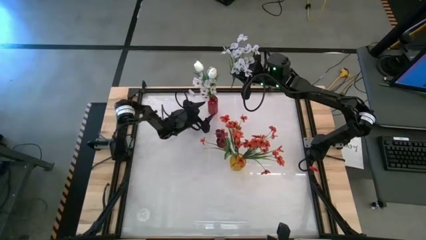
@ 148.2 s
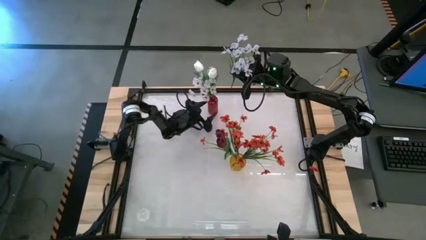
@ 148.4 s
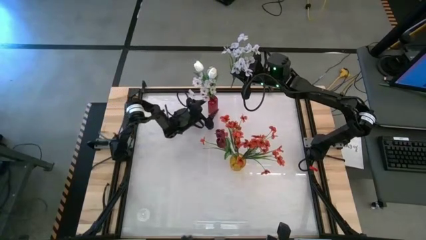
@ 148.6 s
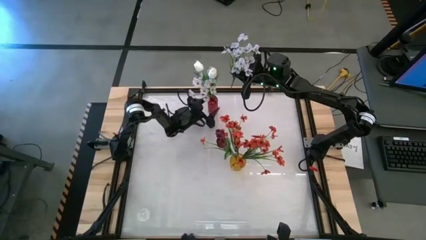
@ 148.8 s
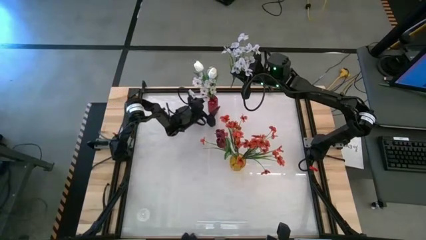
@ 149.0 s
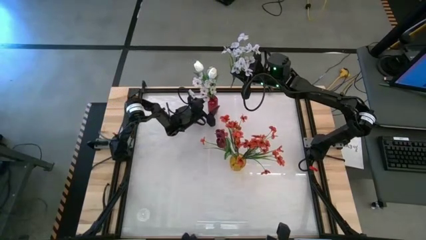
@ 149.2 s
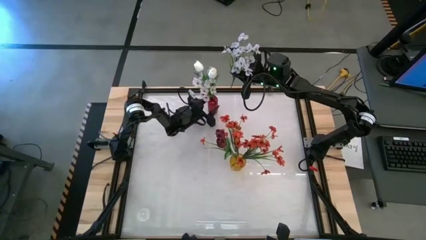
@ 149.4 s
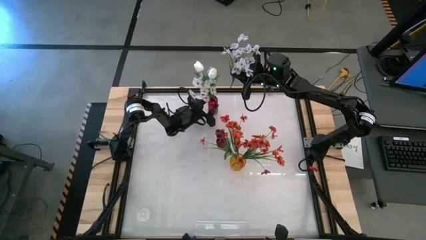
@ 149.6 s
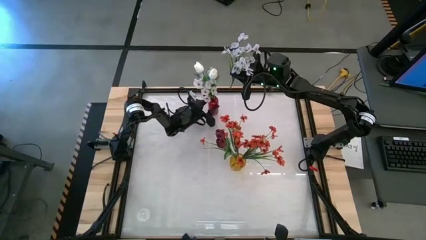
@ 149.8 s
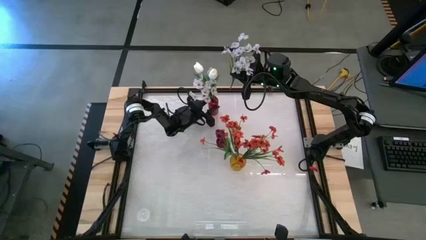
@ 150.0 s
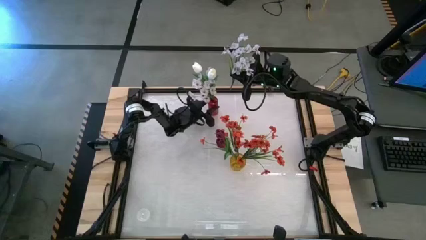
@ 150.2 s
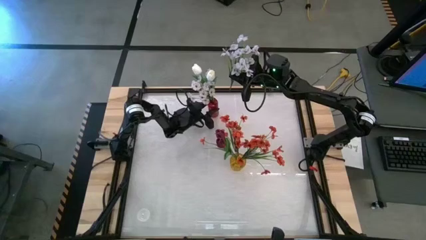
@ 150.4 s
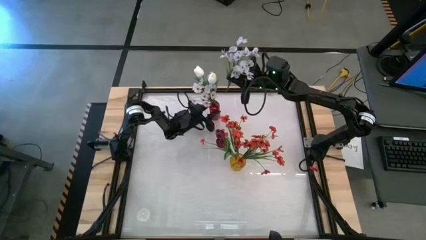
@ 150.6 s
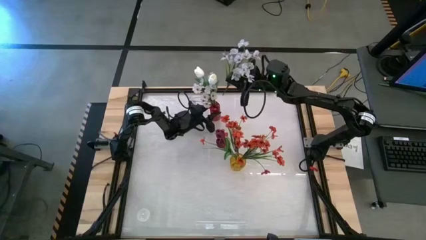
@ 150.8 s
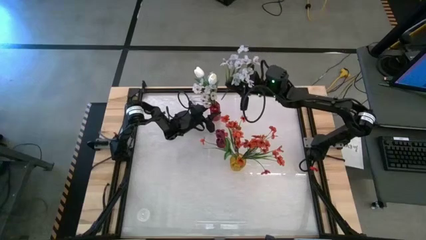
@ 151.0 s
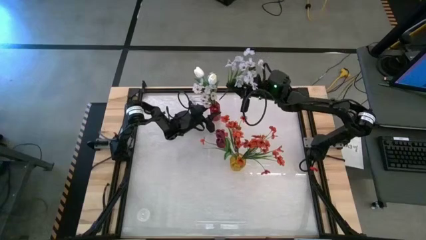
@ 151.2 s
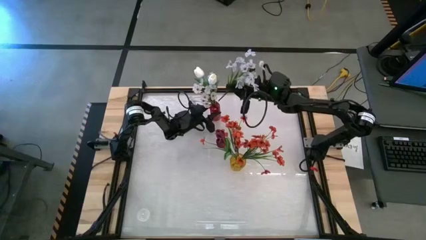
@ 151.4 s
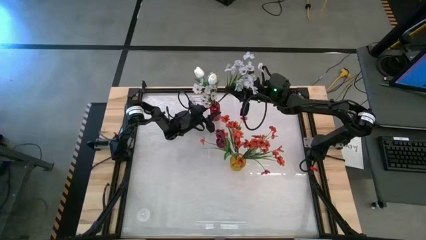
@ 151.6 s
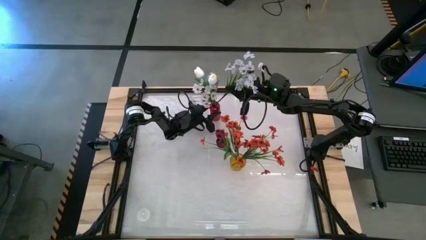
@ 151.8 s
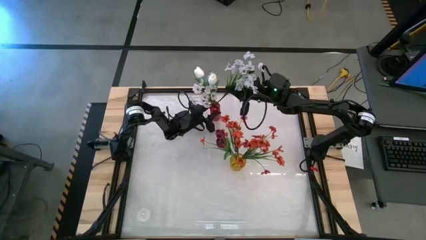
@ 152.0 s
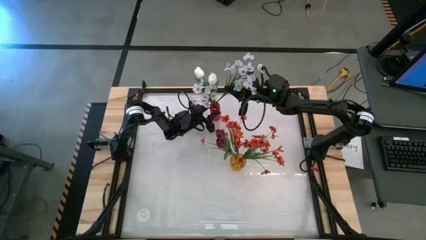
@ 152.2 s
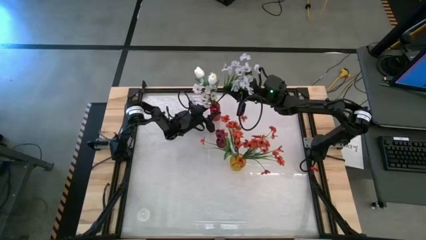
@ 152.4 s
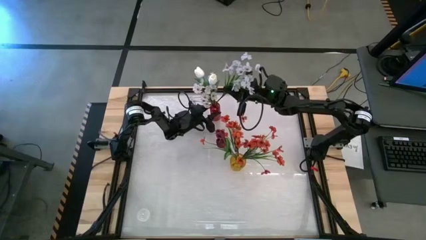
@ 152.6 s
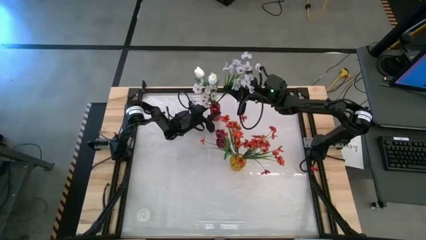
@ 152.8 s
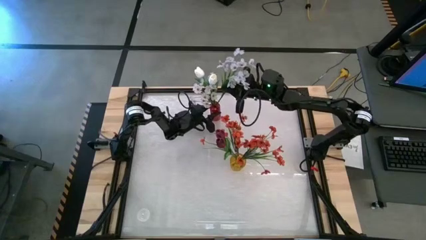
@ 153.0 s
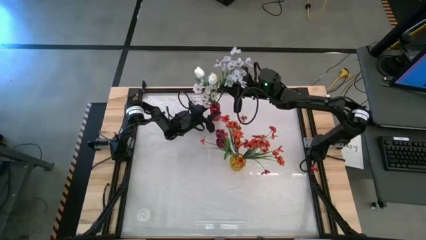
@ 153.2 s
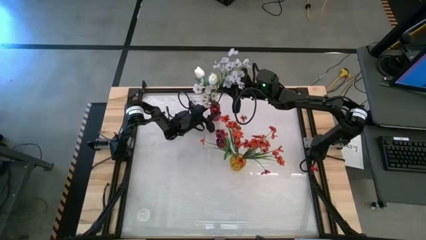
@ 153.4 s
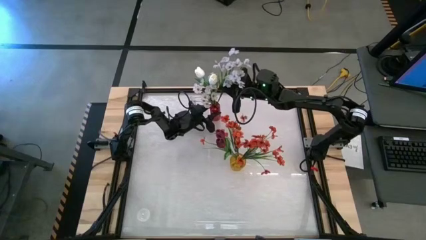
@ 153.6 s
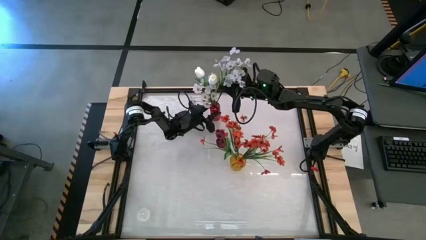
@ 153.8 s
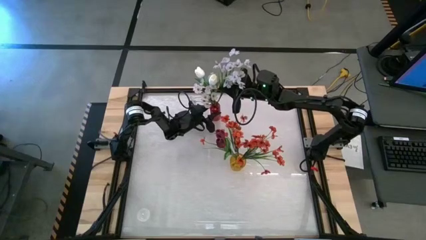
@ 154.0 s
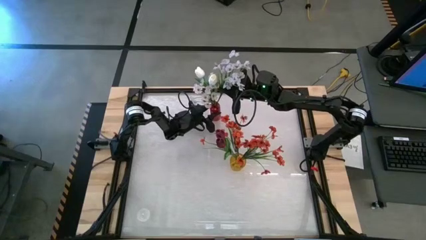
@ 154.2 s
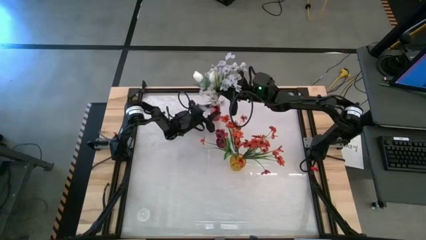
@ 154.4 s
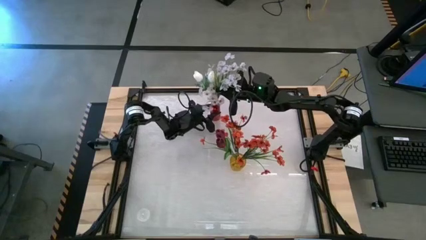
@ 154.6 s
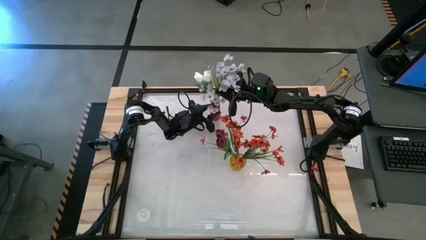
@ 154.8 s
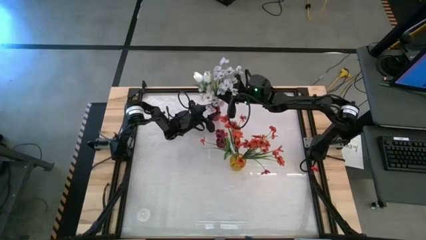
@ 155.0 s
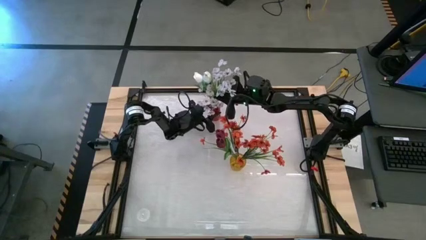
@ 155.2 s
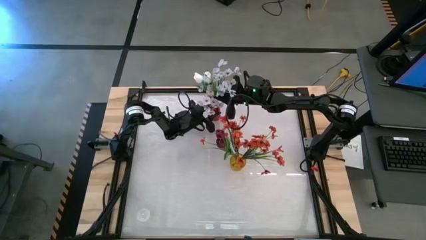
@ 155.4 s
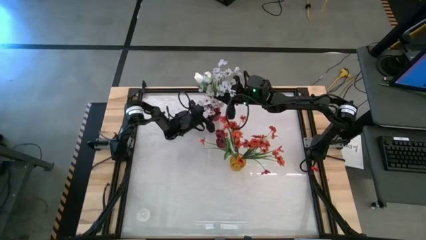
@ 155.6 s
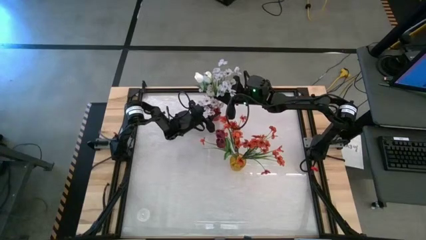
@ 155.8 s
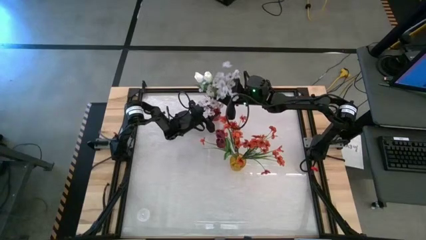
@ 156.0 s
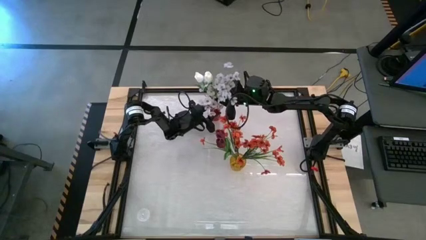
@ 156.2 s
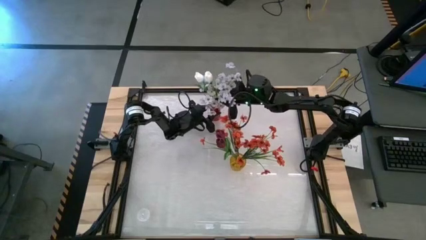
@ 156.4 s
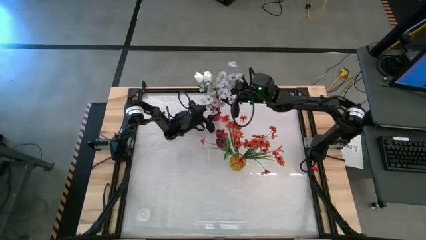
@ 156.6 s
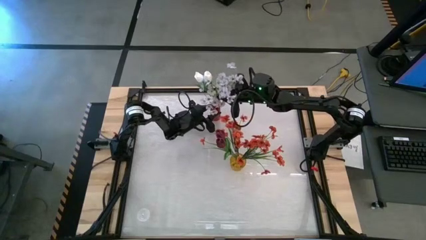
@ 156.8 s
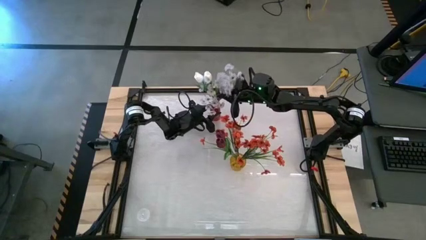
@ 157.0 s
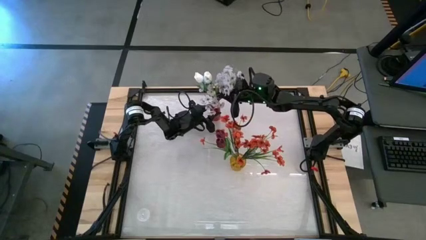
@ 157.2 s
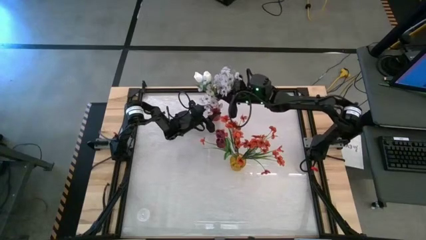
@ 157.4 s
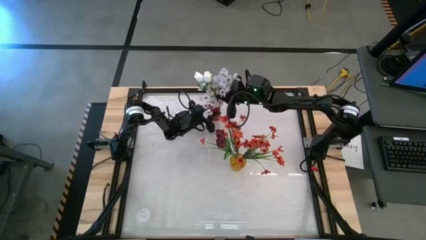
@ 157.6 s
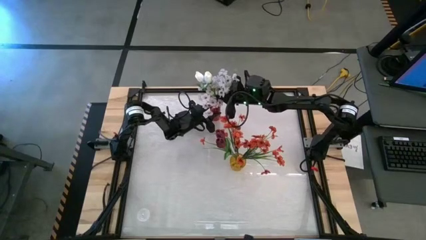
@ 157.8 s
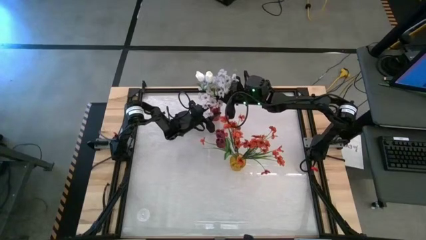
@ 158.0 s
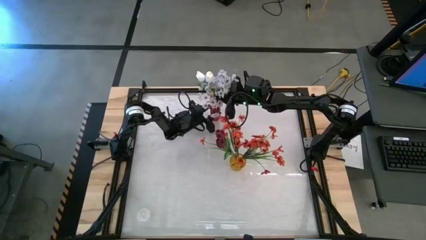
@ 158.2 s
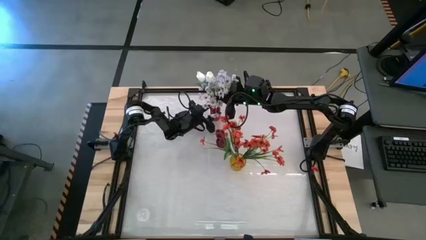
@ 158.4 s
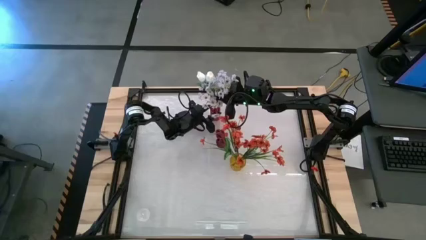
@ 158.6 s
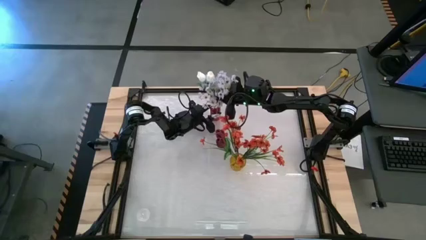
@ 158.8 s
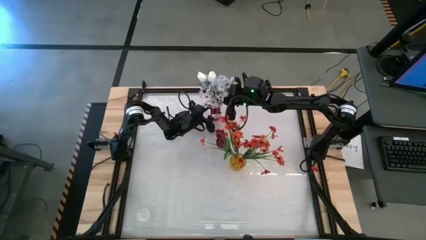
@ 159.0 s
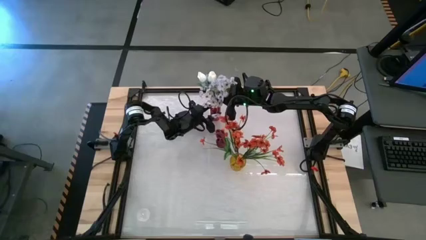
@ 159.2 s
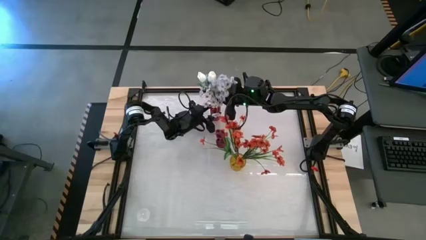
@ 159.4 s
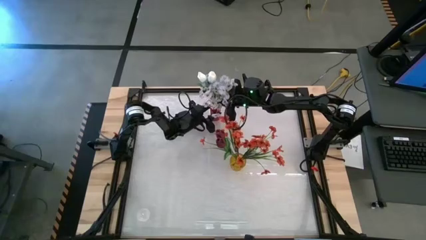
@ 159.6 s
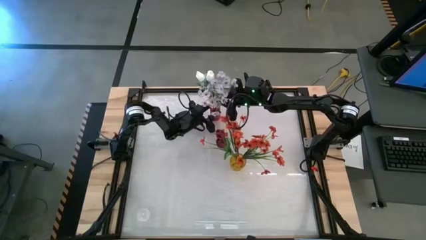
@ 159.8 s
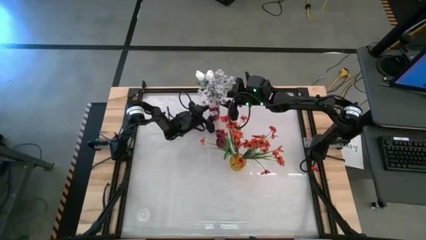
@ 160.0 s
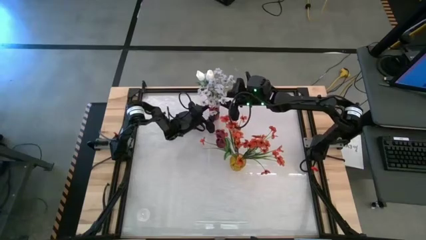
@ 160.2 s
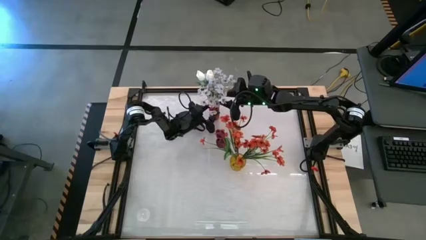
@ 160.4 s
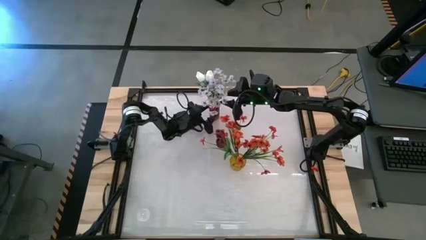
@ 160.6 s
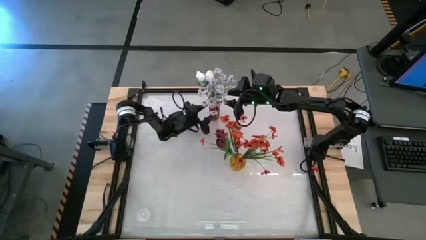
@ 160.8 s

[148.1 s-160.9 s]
Task: Sort flowers into vase by color
Put the white flowers into the red vase

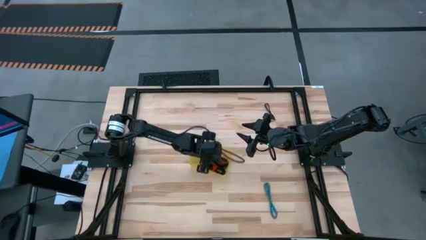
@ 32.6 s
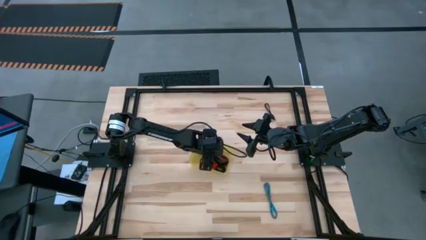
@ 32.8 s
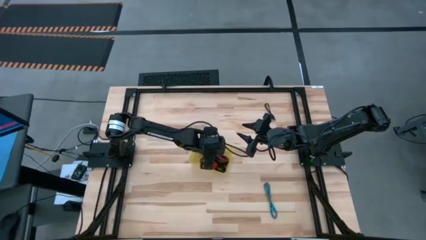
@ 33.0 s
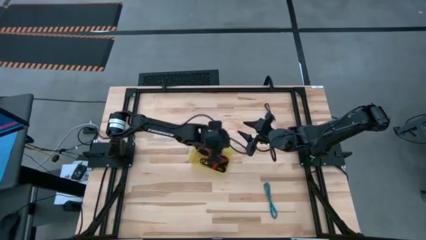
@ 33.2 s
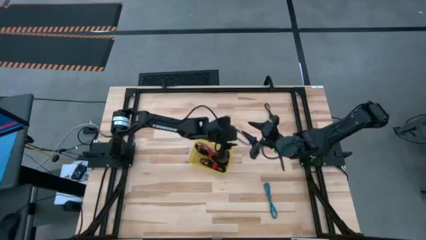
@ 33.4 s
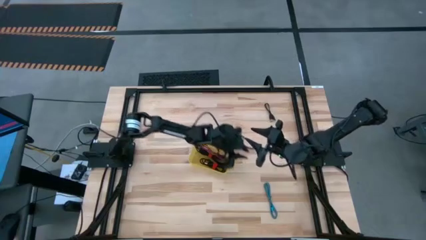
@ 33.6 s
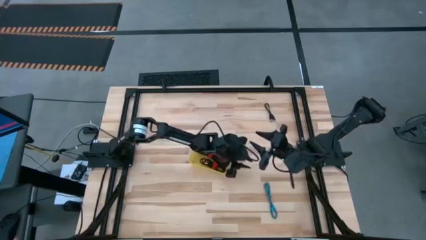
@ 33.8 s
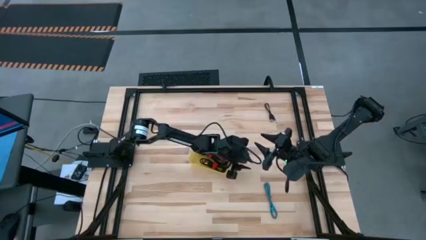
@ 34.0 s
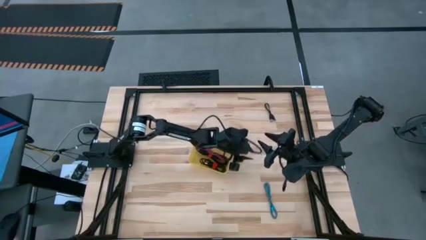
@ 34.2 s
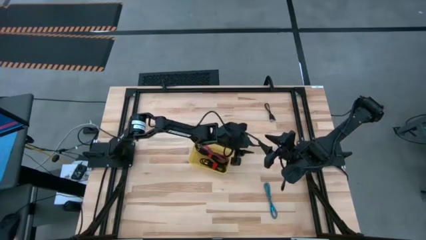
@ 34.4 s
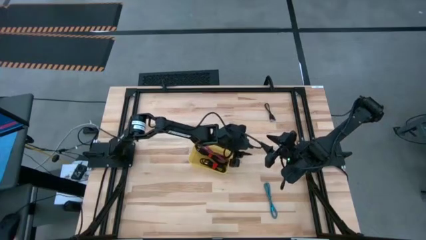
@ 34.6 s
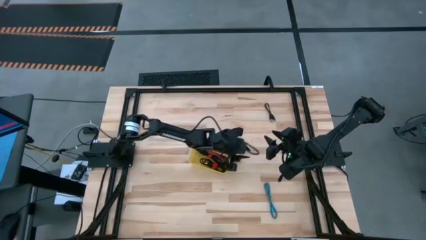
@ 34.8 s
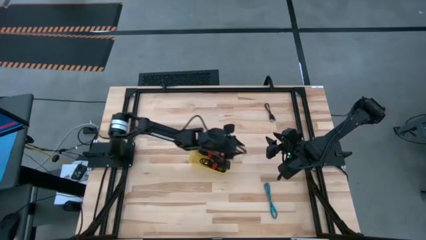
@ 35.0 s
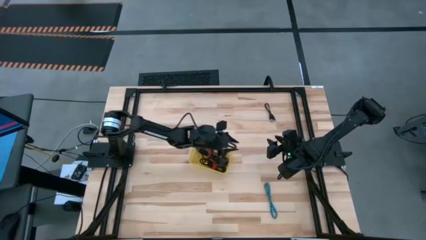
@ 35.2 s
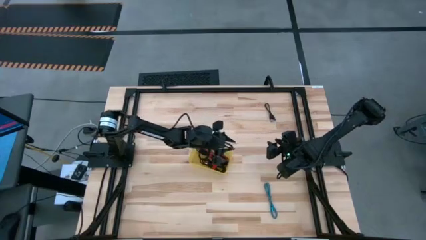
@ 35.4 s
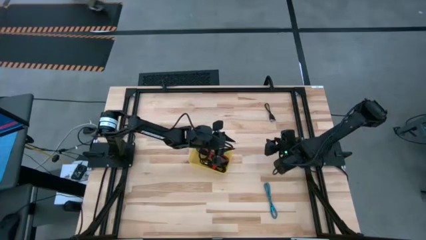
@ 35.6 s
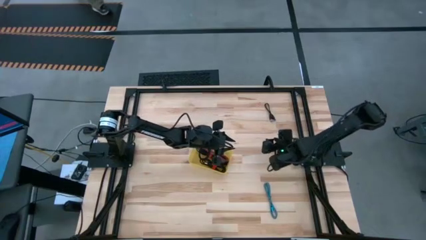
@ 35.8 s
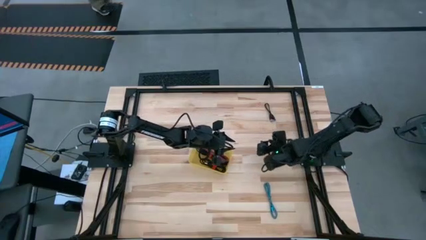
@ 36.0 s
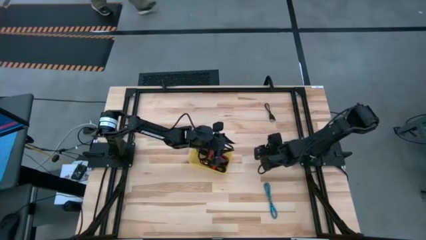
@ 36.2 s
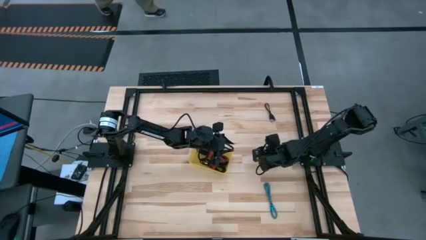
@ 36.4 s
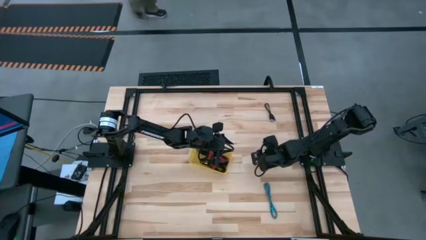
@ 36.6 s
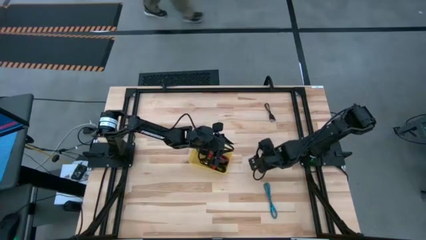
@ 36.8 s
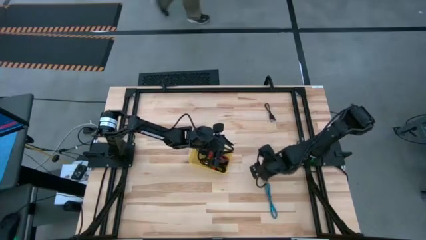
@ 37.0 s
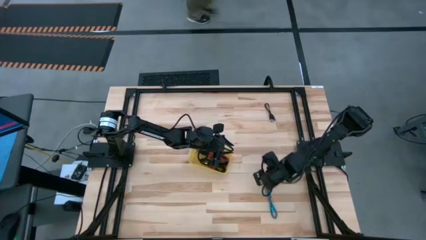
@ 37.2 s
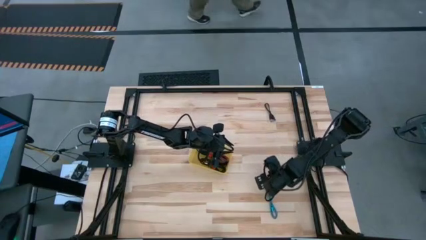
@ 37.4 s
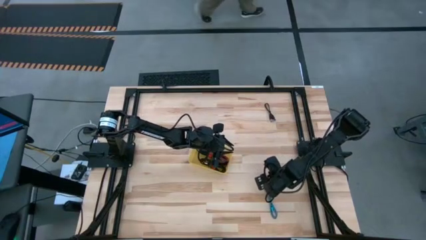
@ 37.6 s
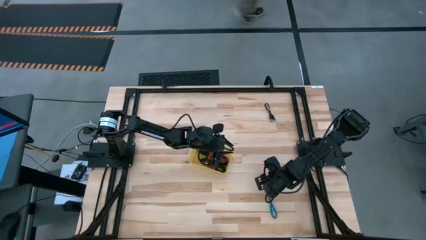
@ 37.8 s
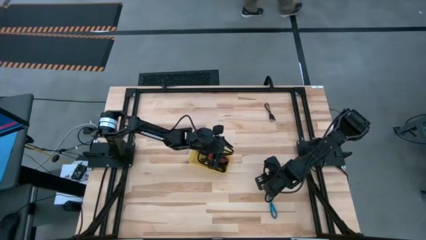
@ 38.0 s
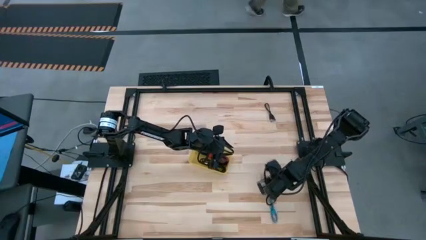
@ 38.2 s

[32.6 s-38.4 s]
Task: Pick and place USB-C Cables
Put the blue charger cable into the yellow bin
